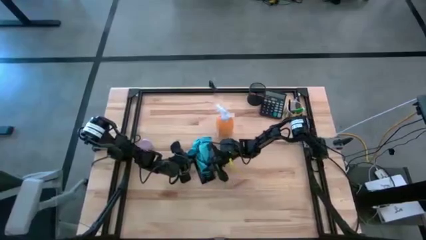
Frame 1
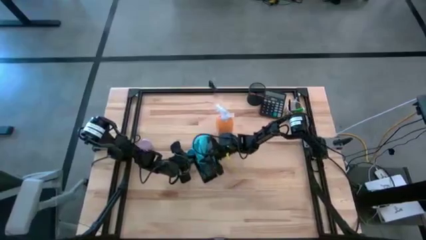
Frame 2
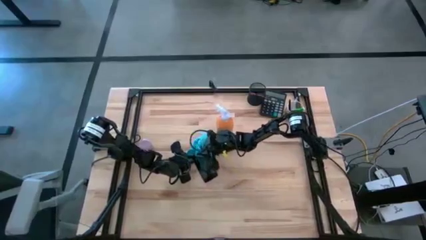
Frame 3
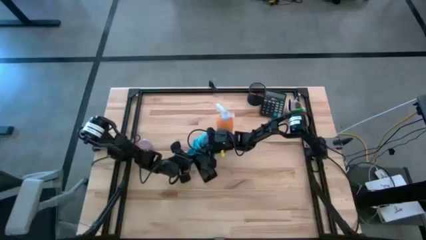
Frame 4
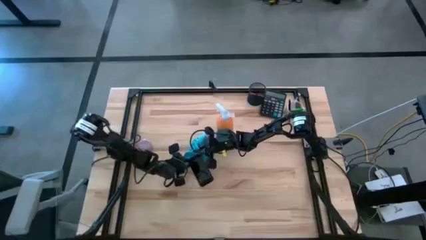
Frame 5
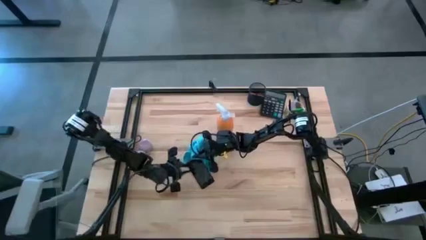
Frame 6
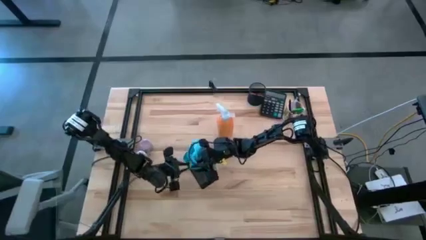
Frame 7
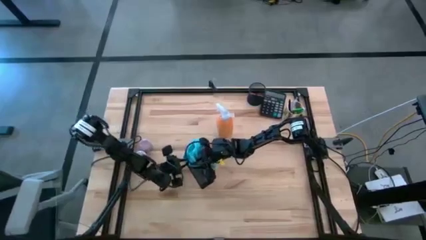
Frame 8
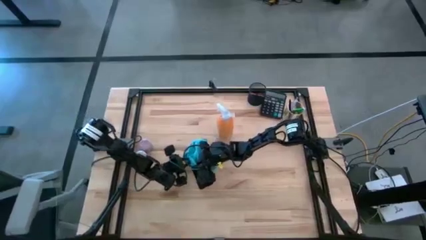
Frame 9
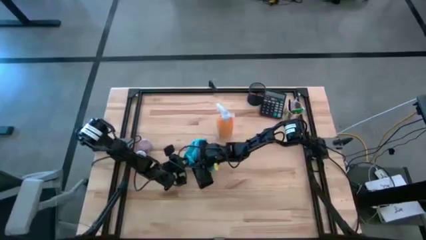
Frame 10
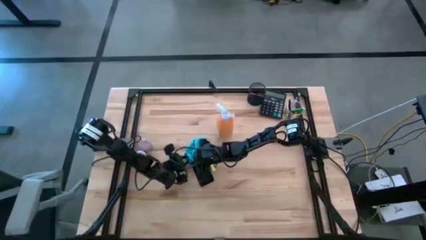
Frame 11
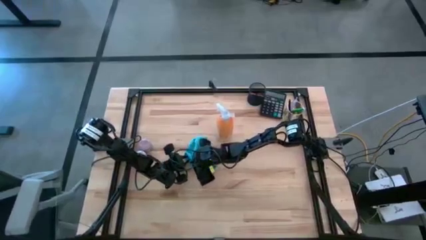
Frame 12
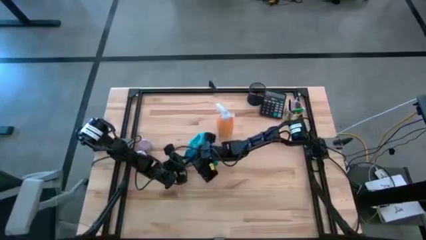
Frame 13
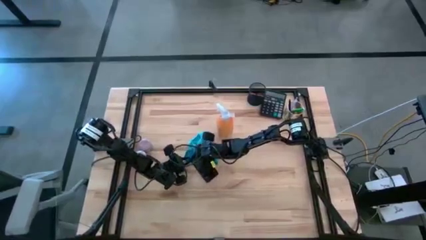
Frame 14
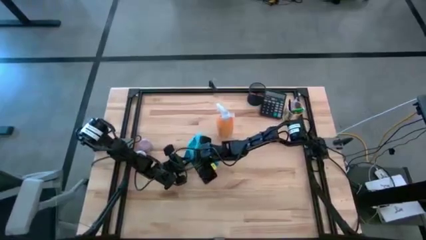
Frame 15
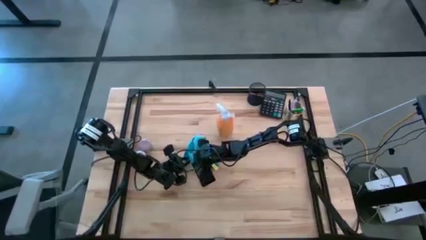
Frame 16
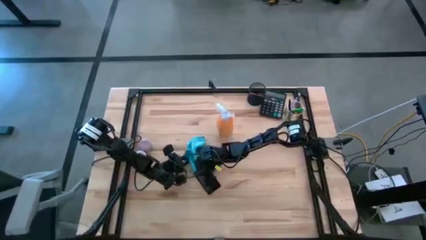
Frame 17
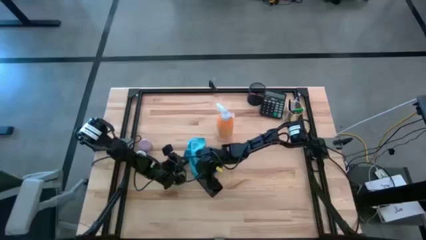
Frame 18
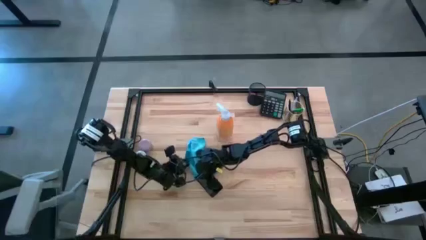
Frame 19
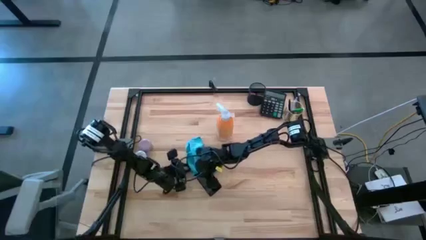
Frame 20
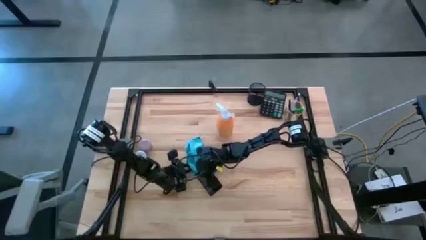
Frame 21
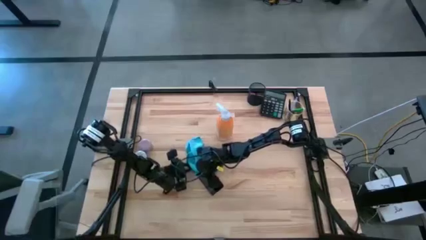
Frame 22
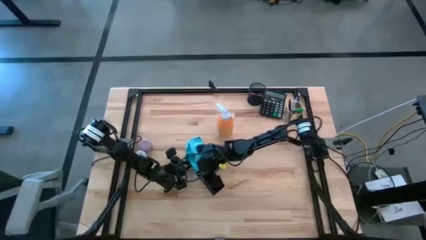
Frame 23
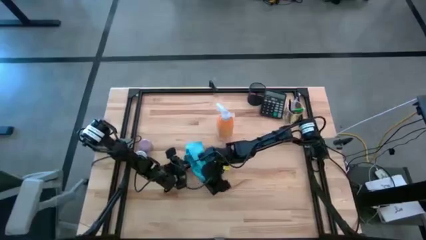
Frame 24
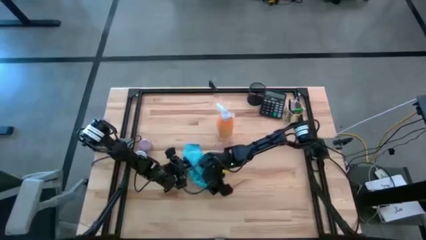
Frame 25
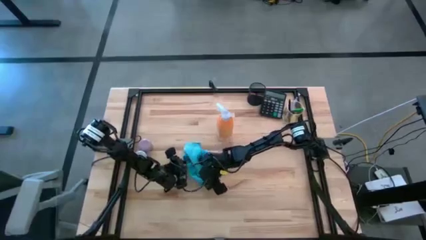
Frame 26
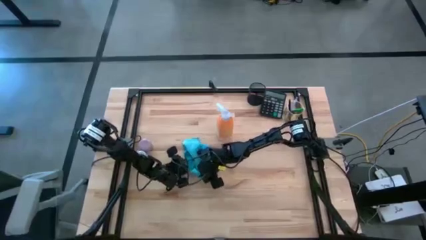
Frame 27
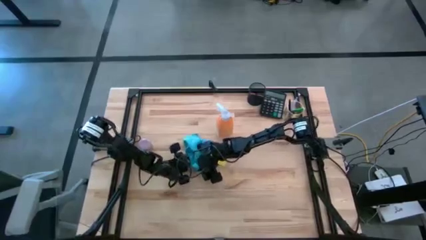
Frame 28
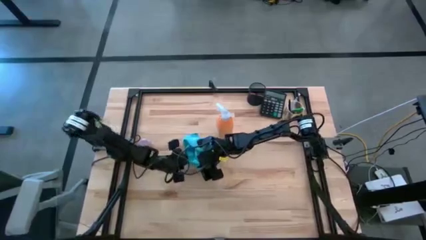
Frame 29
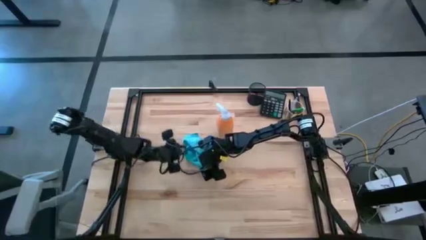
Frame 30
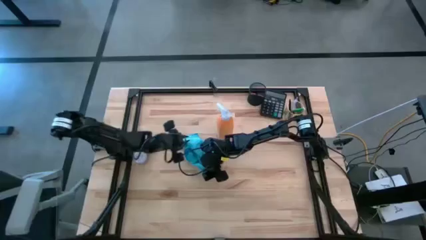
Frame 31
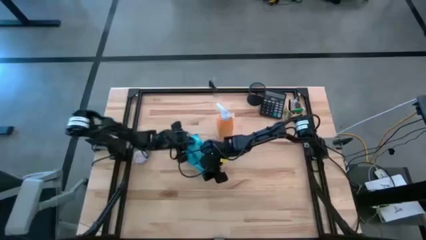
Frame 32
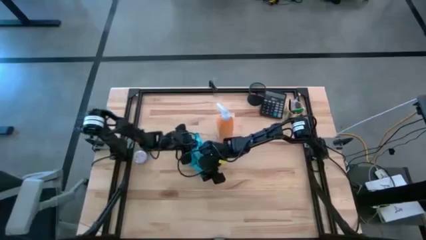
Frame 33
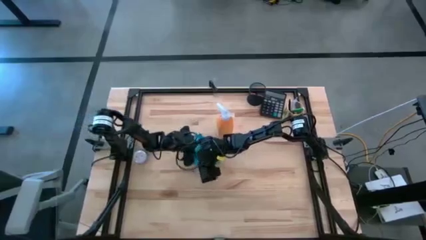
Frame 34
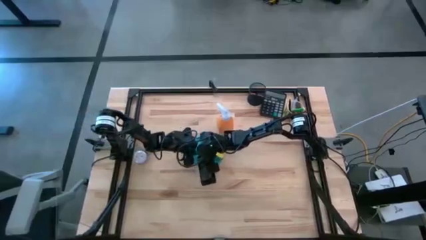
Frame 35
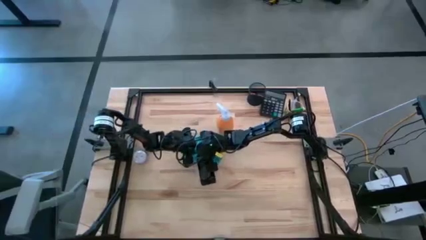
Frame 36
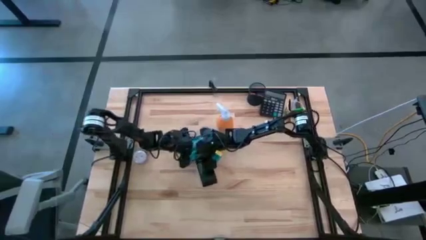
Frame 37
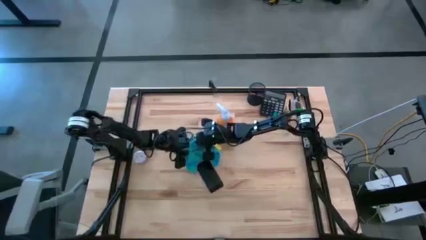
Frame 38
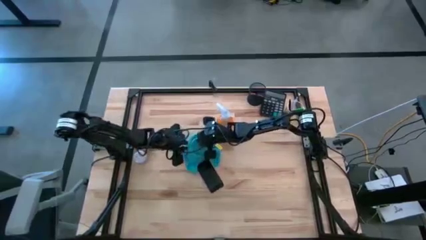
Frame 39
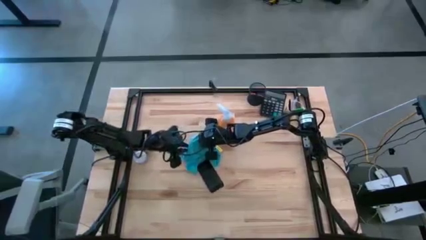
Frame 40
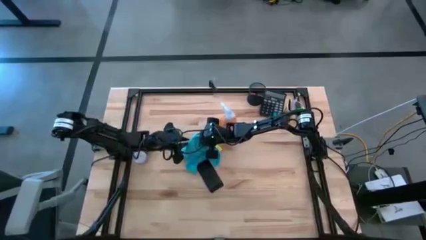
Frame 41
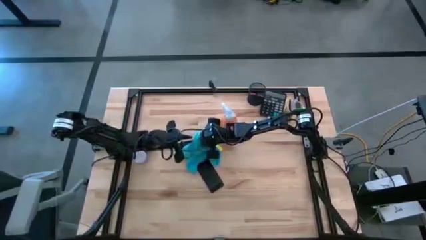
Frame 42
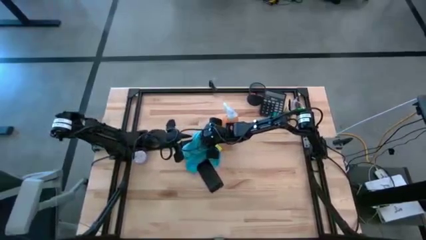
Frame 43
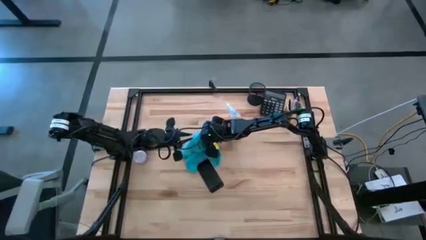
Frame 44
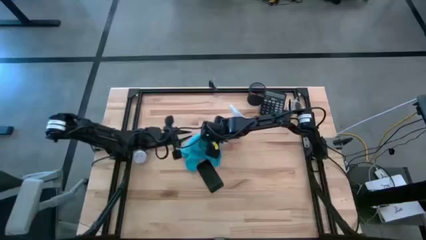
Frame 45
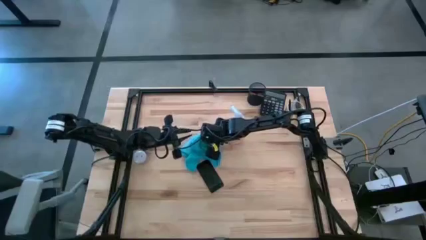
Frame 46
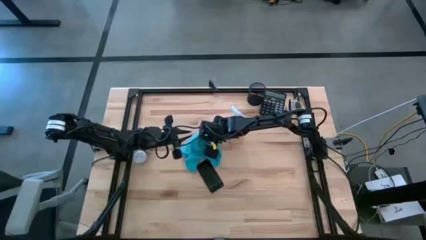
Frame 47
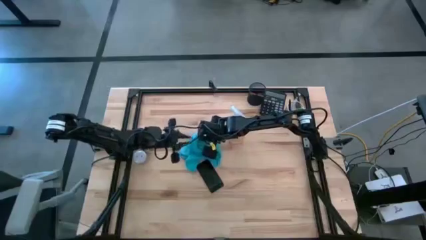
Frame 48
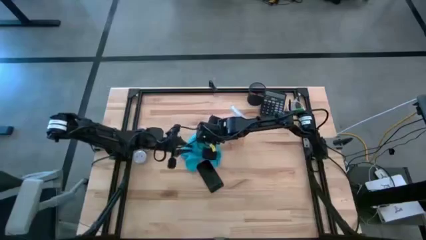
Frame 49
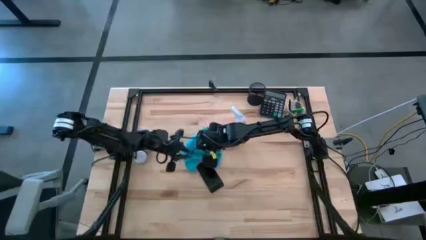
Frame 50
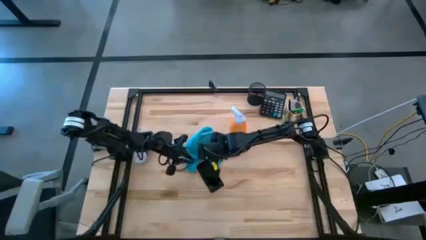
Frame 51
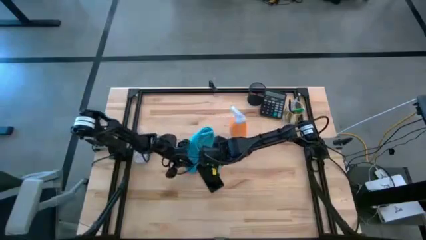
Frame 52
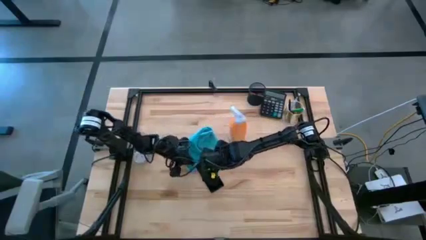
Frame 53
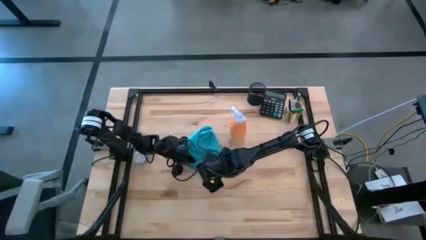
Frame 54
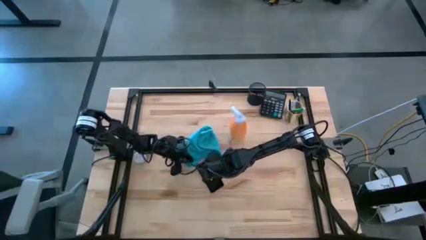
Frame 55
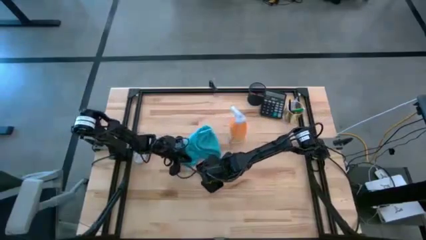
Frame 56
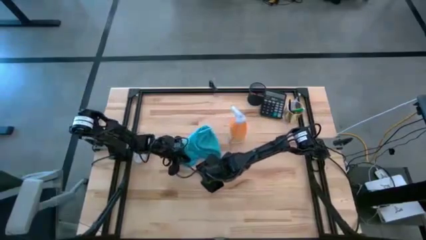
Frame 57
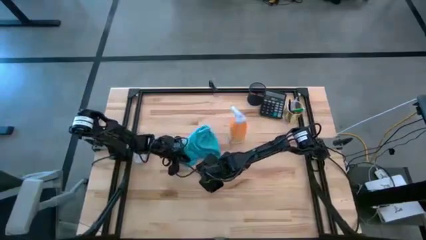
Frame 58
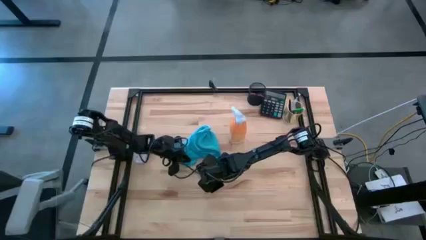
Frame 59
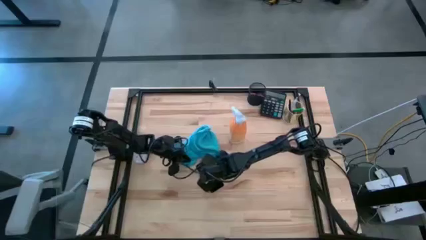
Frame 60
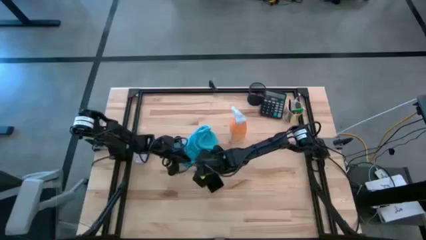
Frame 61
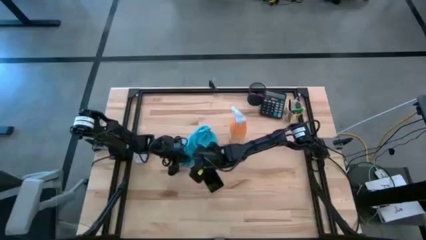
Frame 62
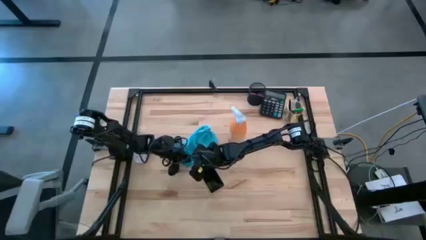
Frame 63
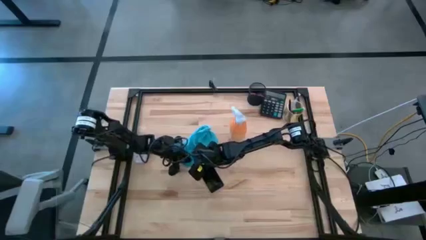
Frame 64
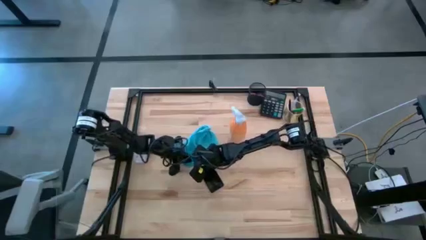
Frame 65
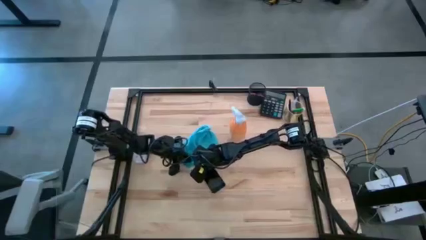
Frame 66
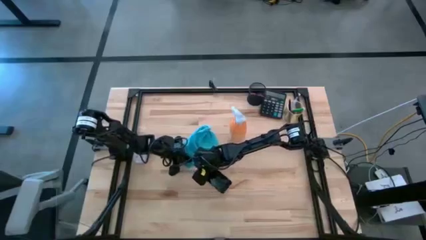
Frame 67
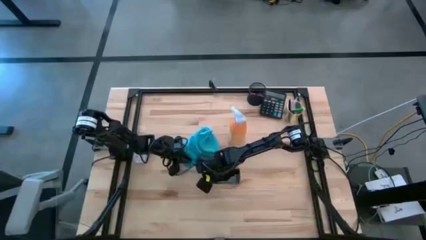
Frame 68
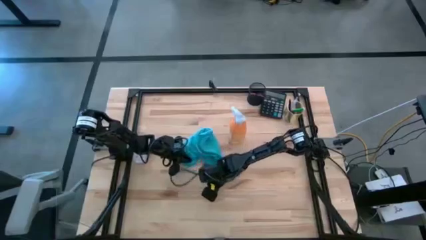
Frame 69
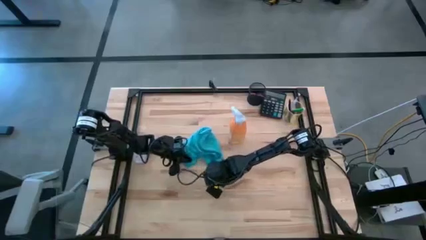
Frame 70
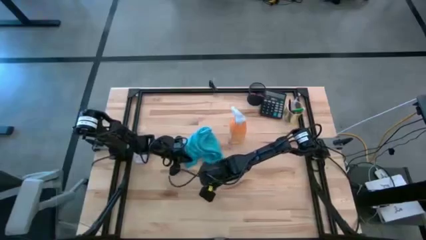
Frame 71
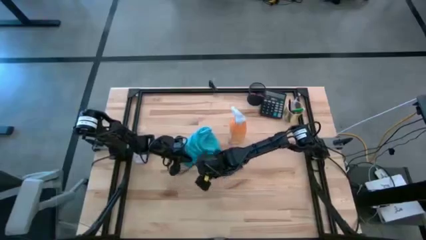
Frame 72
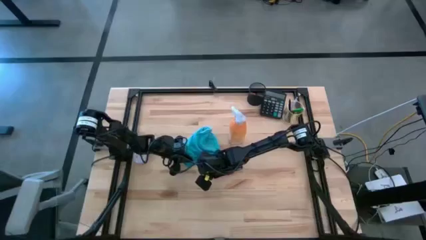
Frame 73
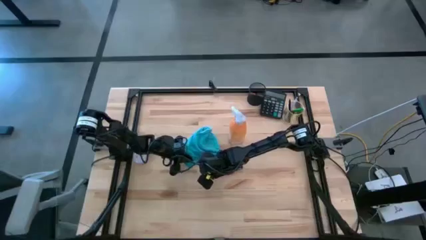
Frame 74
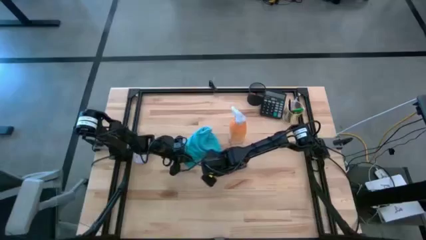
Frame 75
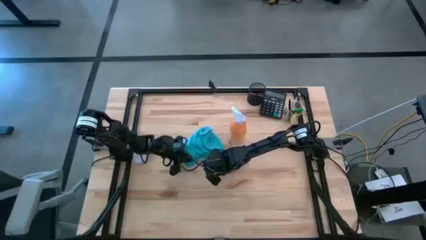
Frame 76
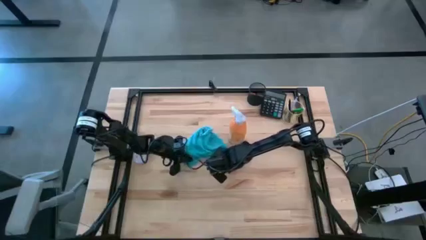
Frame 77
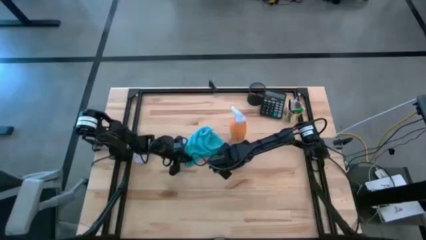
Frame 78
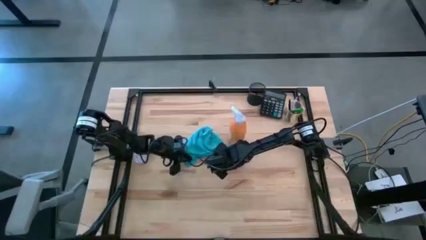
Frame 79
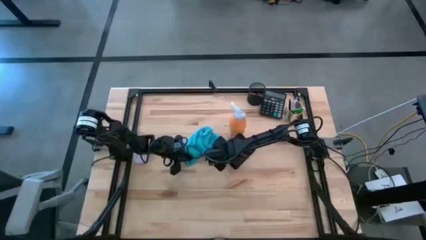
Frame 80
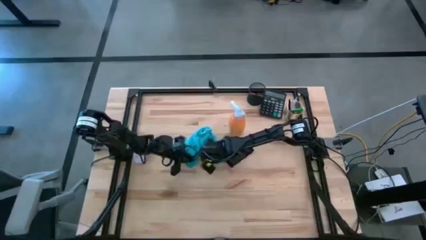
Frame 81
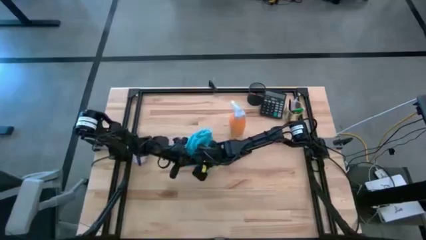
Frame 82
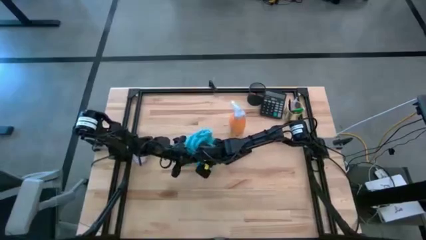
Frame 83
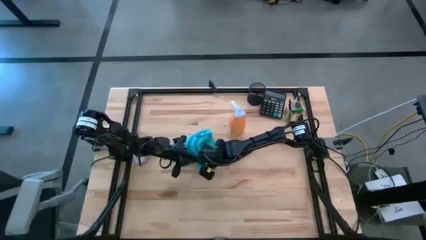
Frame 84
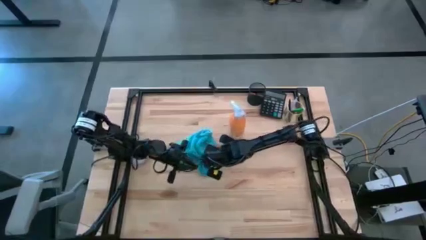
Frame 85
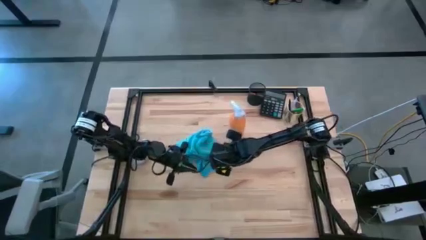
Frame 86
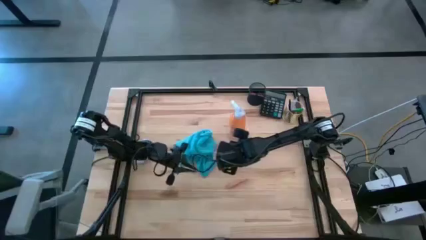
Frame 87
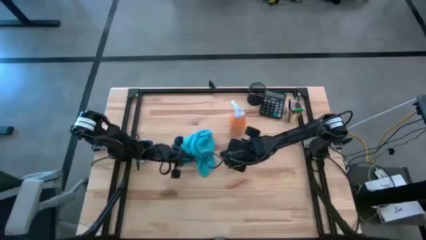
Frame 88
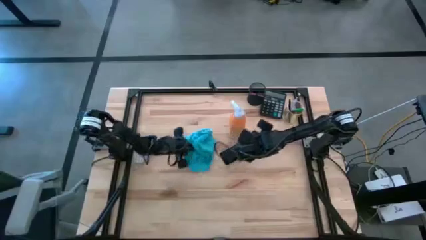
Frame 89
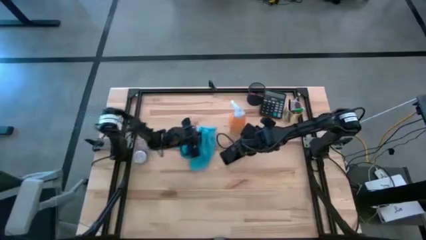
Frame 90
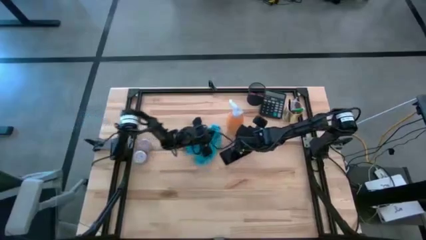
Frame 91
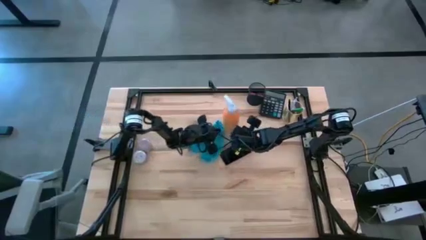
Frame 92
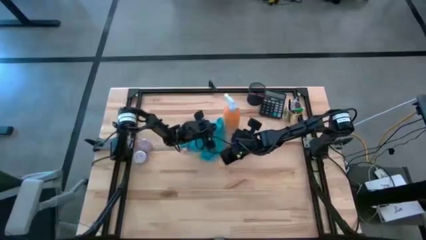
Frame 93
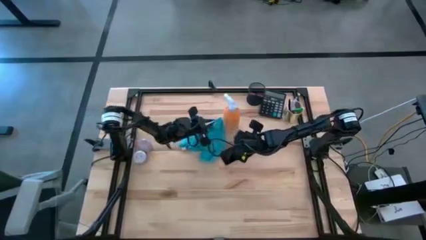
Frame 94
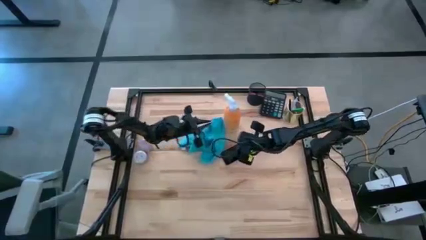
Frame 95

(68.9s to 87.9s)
Task: Apply microfiber cloth
Wipe the cellphone with the microfiber cloth
